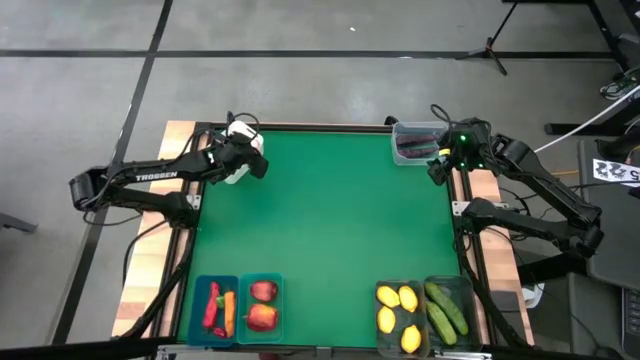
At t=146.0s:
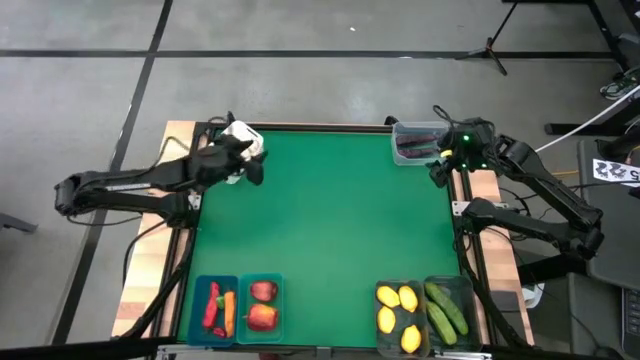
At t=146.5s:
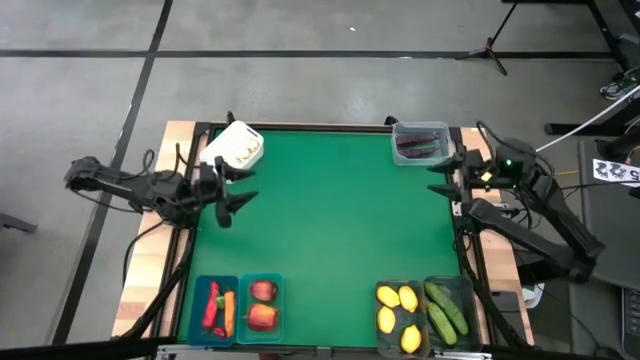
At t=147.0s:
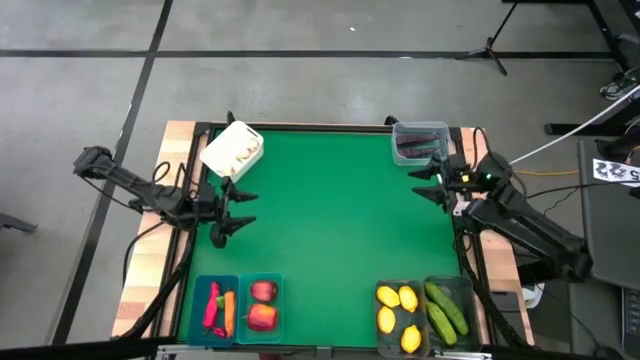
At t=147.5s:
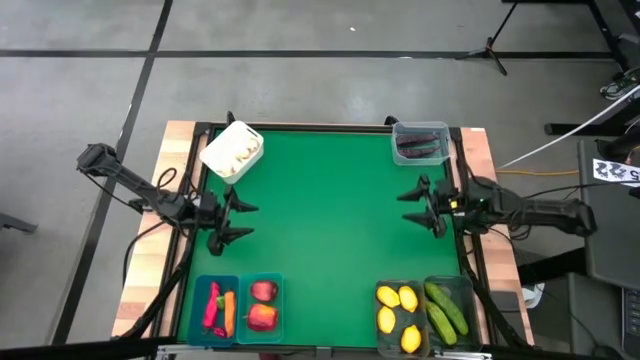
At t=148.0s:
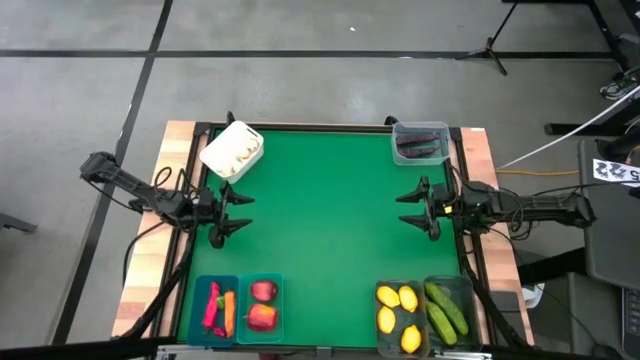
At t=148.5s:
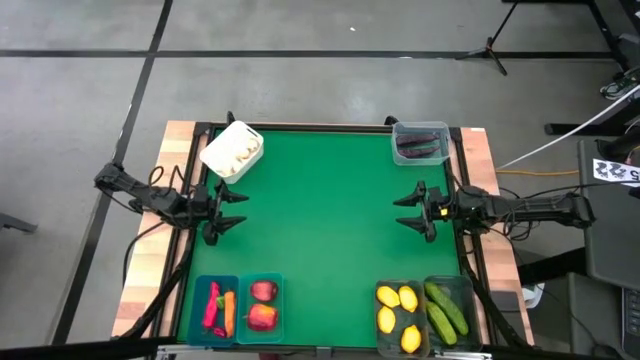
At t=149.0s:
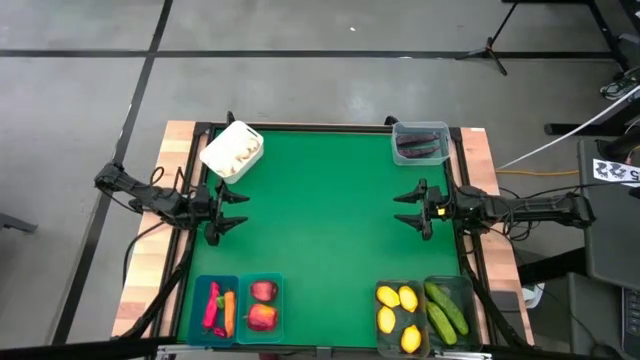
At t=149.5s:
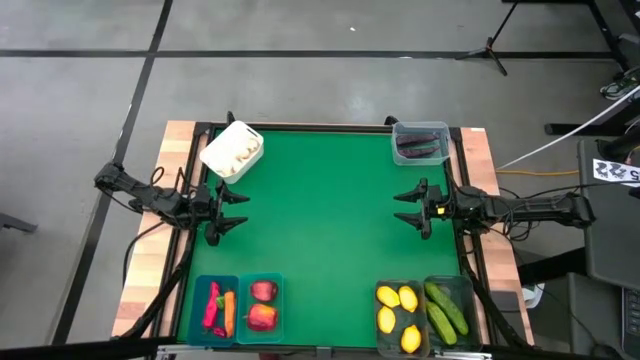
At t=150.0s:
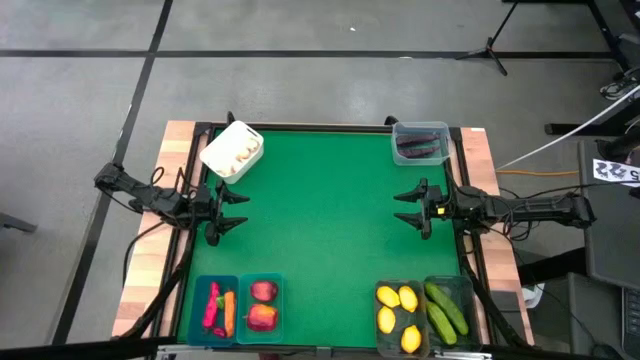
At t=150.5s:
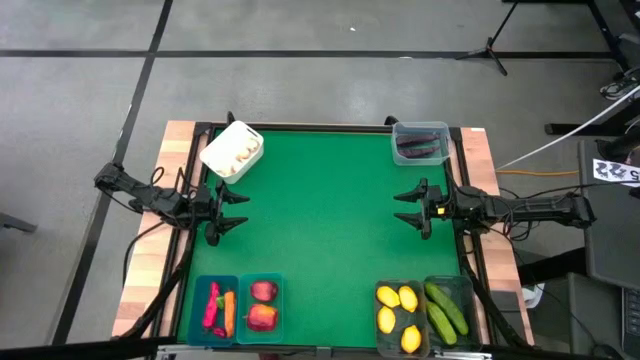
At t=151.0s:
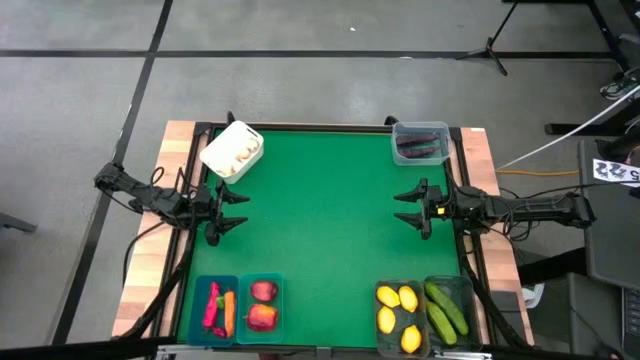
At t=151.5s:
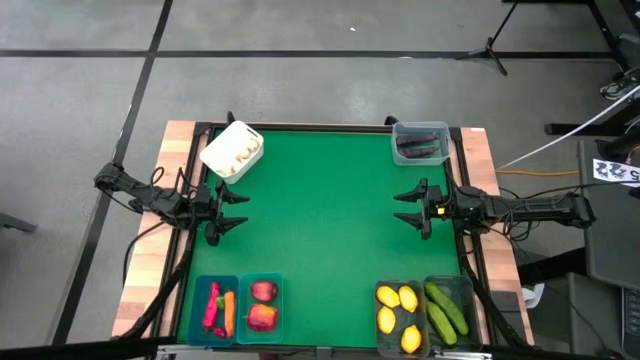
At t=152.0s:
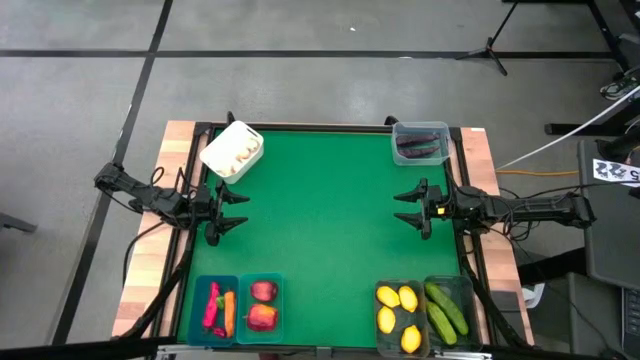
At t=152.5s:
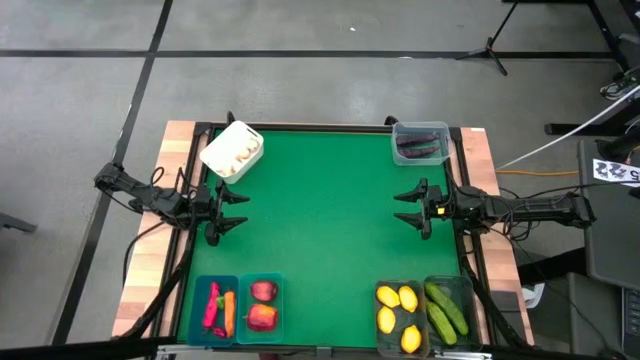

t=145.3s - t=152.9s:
Task: Sort produce into baskets
Return to Home Position

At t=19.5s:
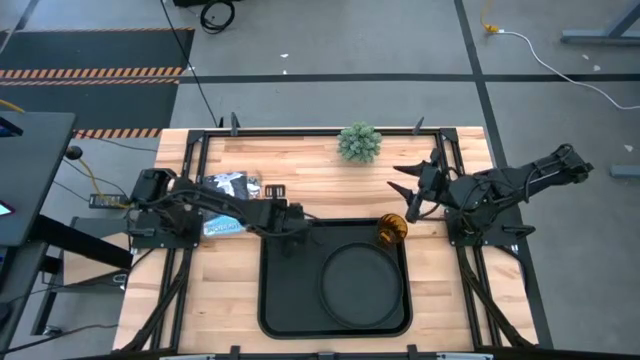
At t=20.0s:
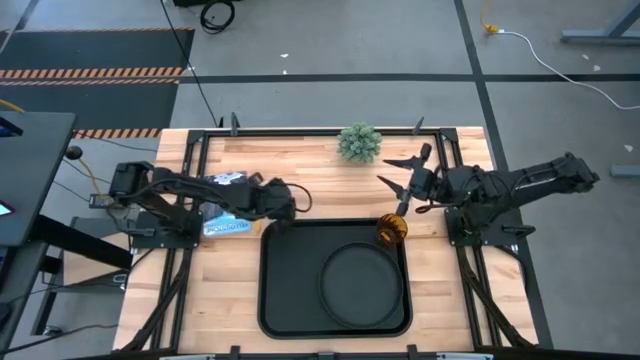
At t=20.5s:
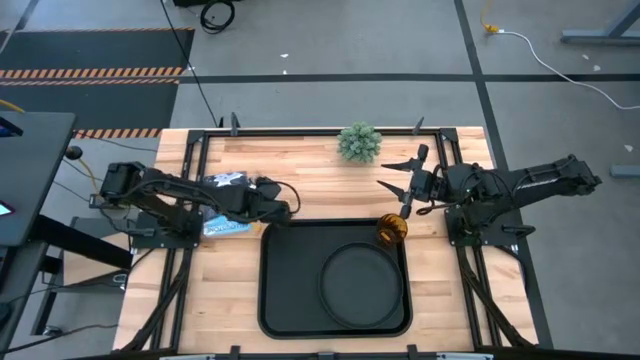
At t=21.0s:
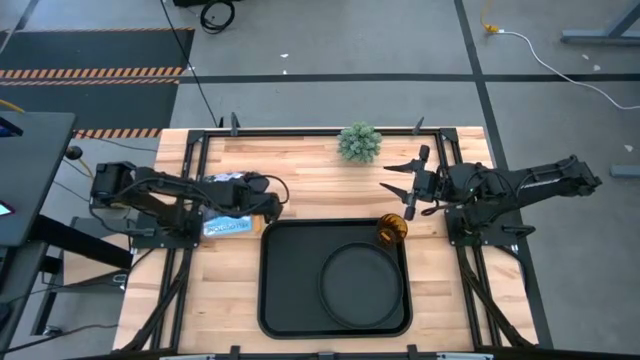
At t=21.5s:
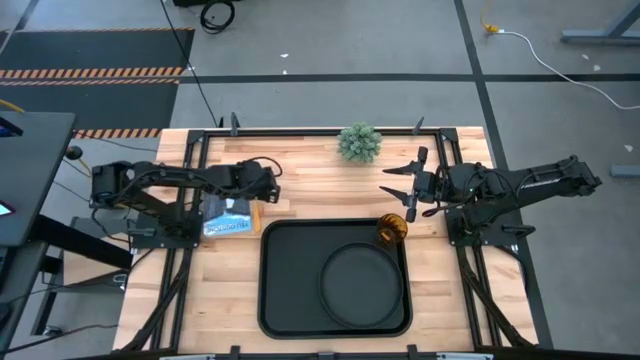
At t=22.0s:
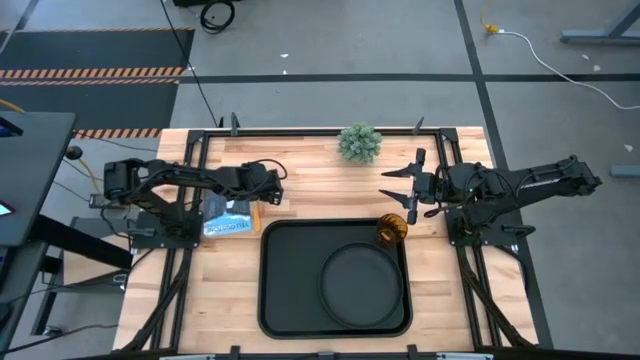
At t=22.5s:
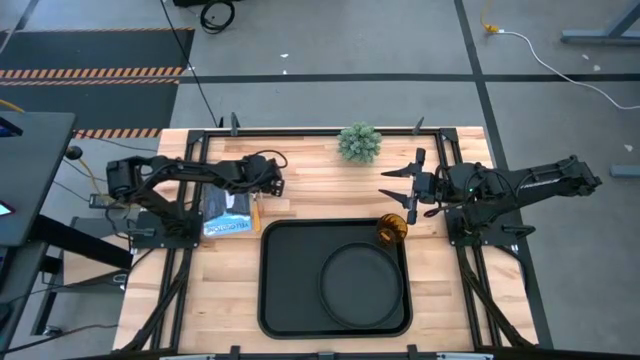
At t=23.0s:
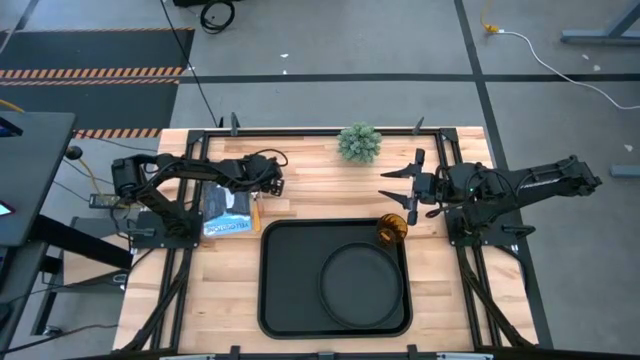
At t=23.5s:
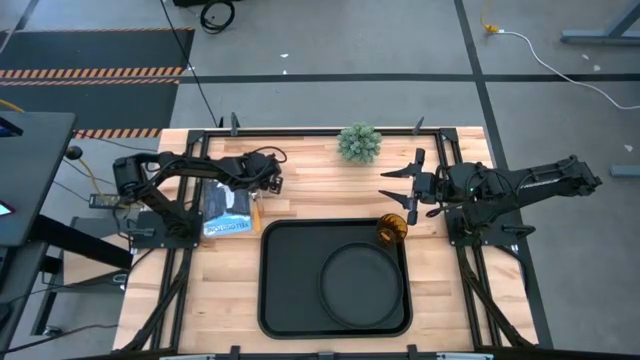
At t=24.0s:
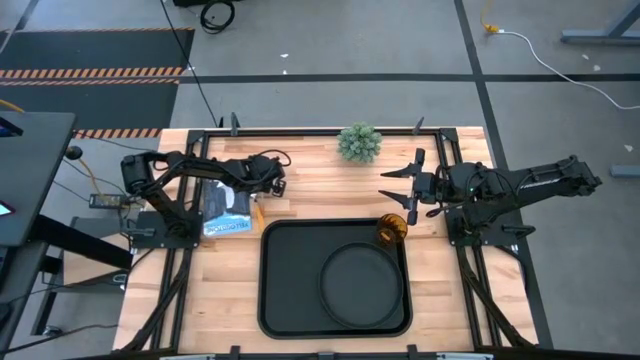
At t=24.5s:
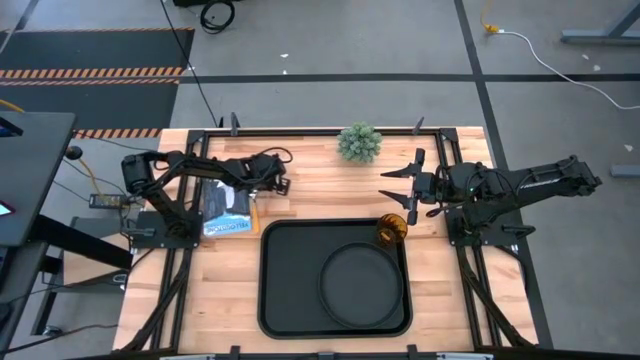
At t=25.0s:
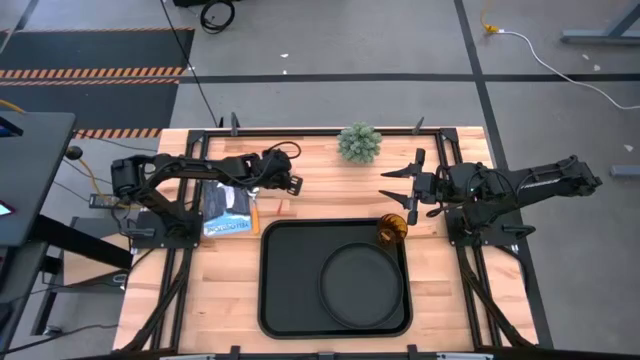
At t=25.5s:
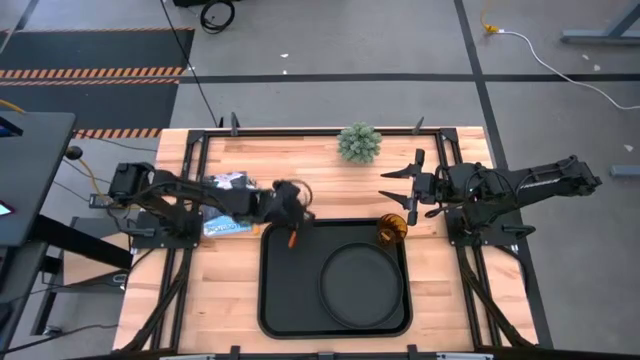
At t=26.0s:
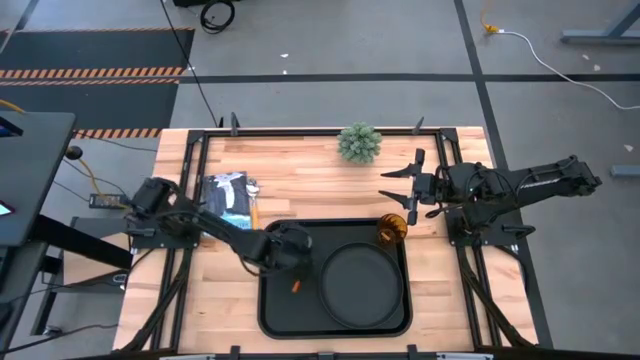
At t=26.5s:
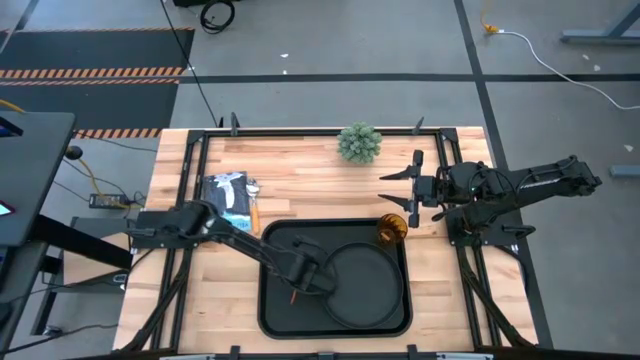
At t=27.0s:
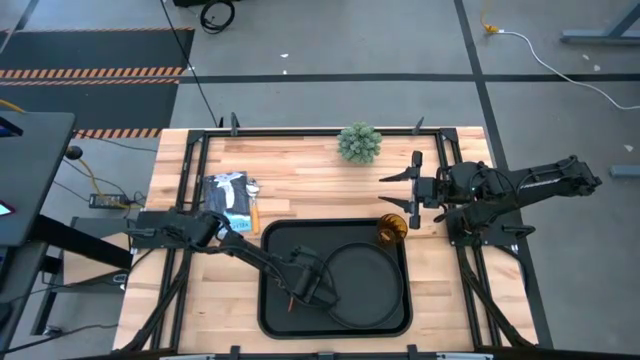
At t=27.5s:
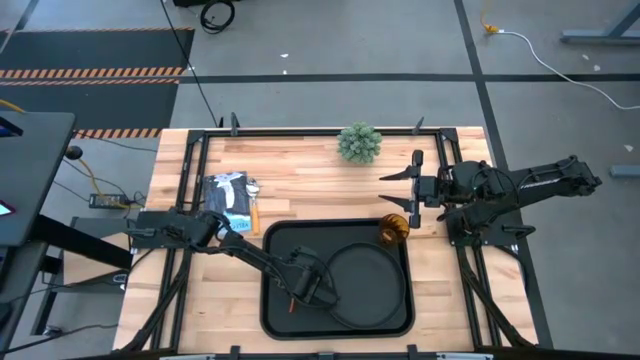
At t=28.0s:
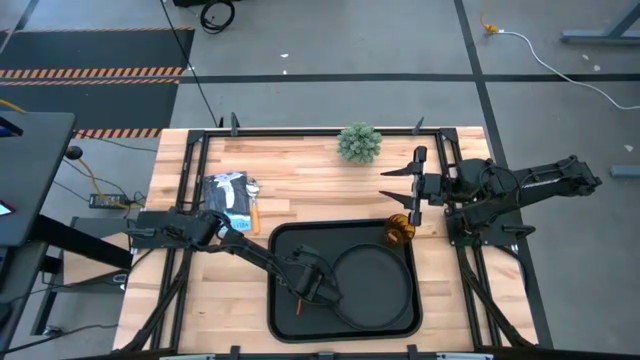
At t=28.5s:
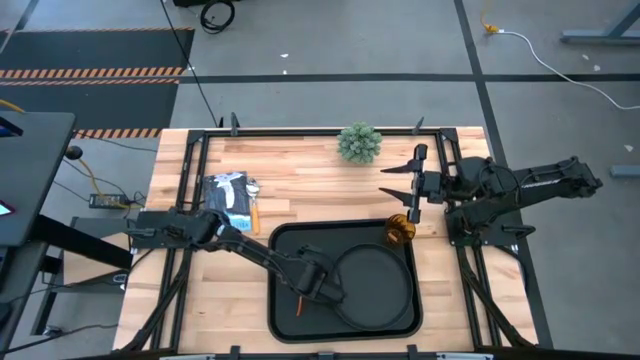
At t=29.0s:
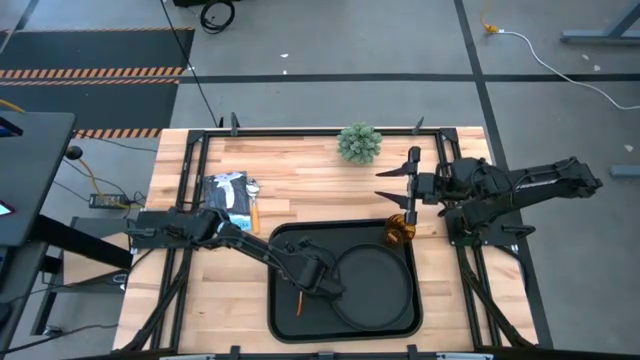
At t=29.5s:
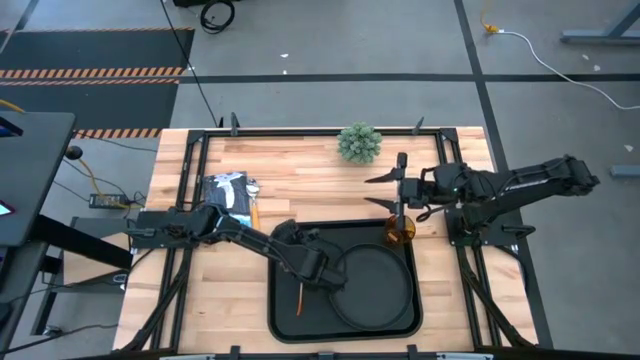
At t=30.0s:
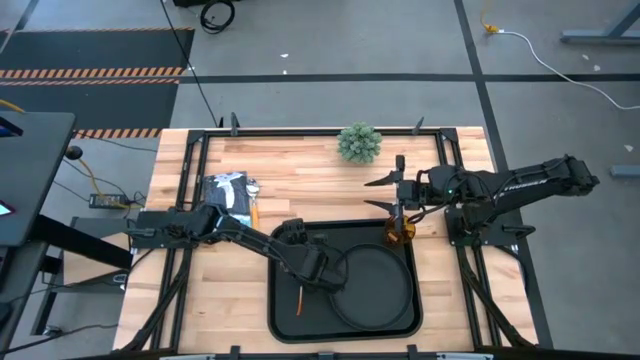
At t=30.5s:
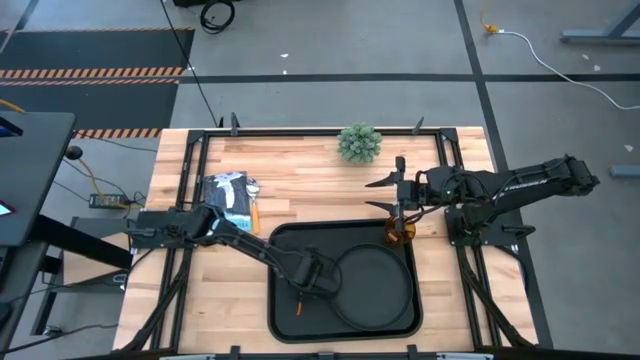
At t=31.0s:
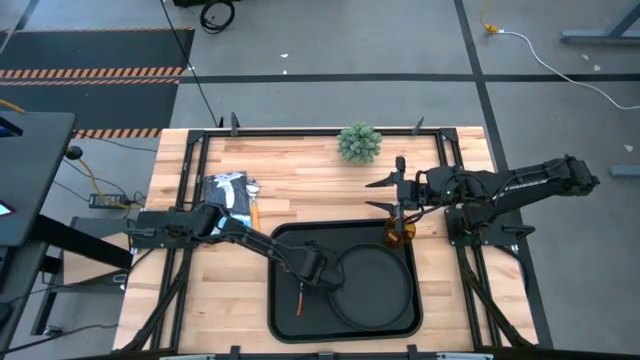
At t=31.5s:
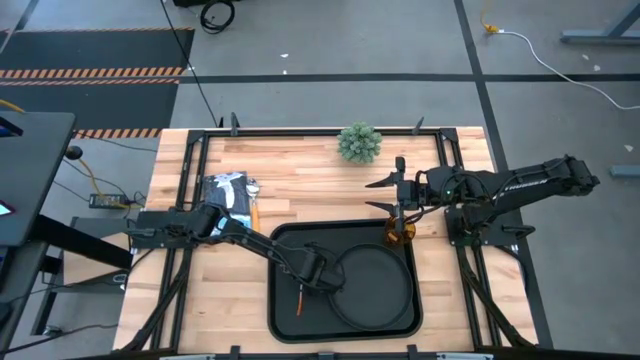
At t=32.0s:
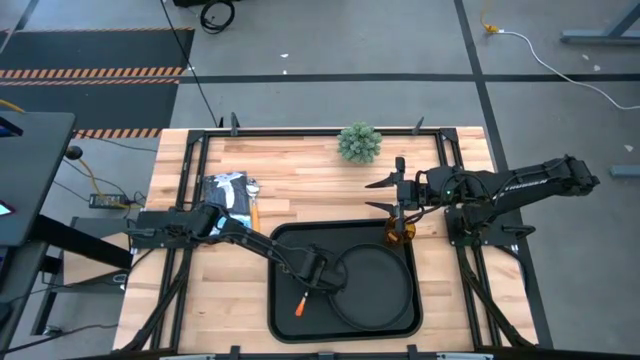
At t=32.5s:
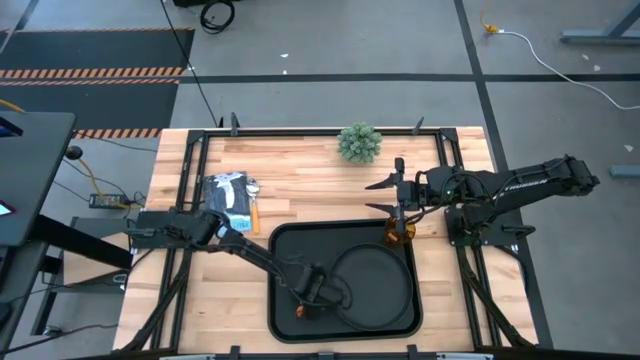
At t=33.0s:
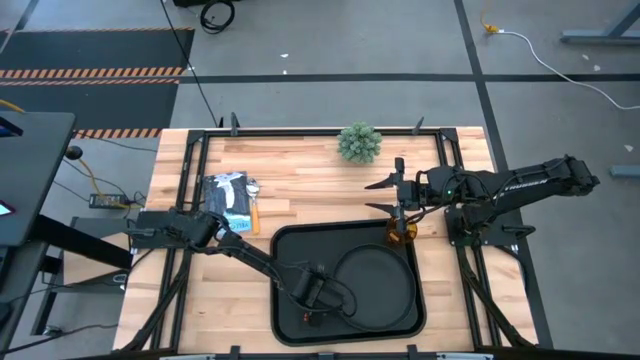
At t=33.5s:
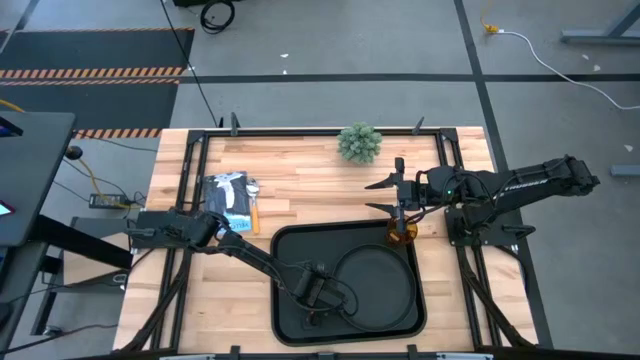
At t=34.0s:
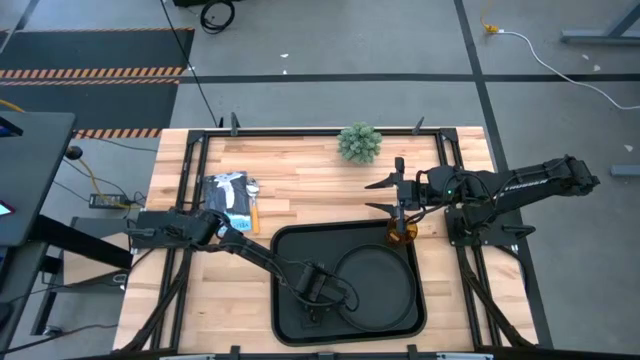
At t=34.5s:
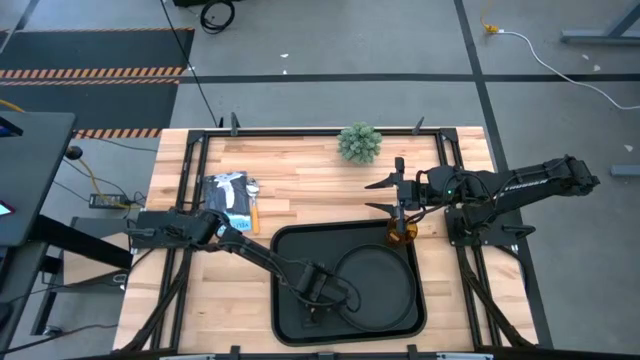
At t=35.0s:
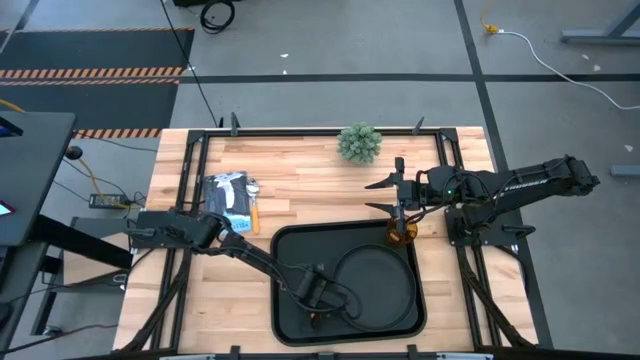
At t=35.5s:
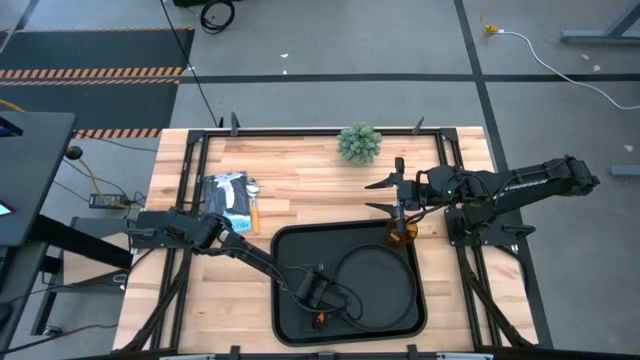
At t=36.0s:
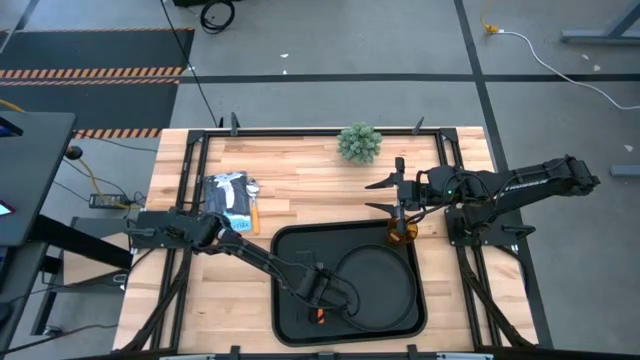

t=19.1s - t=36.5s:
Task: Pick and place plate/cup/fork/spoon on tray
Put the orange fork on the black serving tray to the left of the black plate
